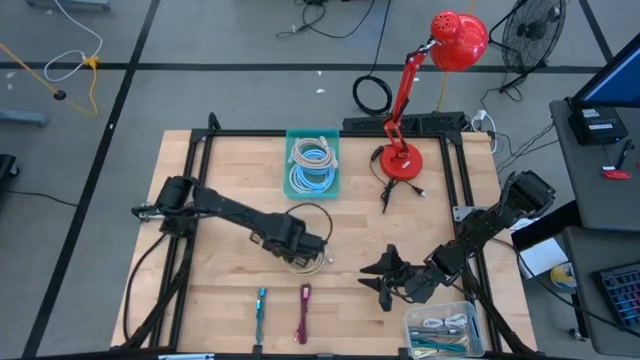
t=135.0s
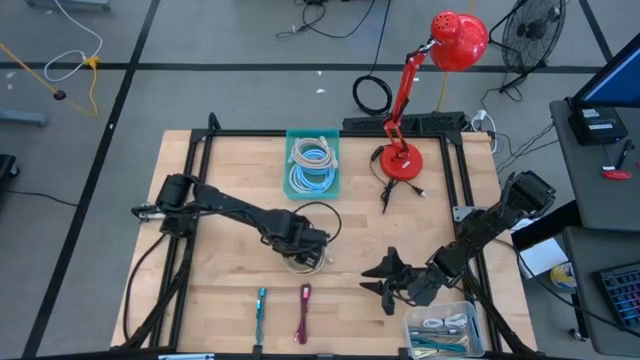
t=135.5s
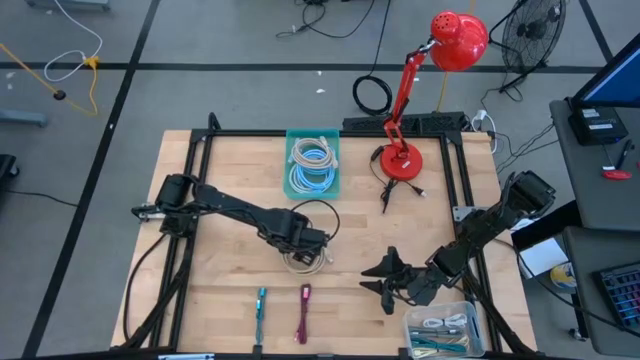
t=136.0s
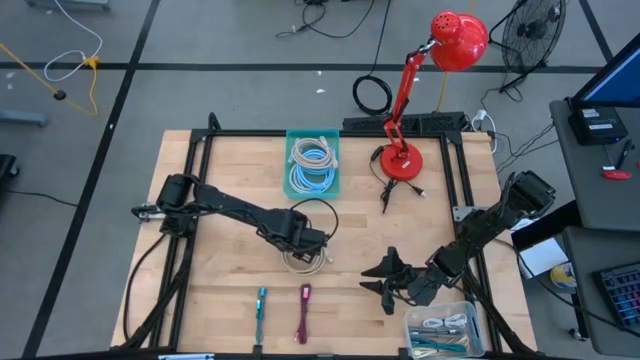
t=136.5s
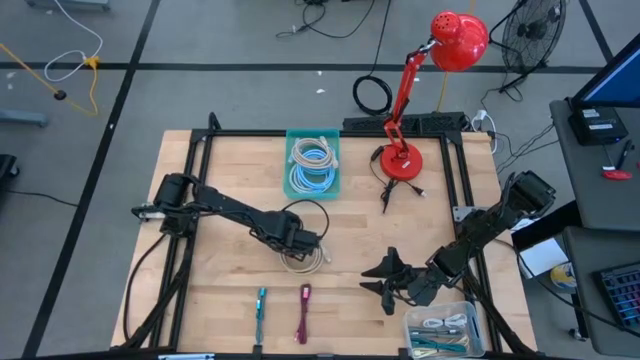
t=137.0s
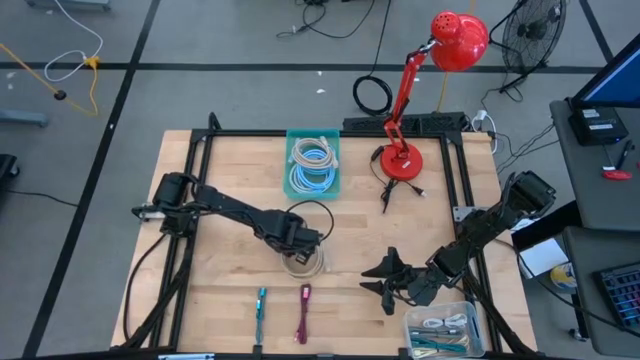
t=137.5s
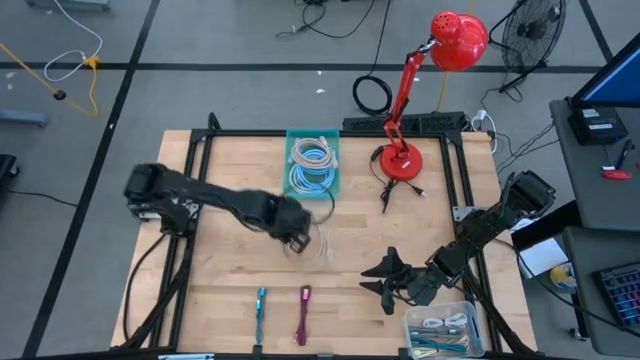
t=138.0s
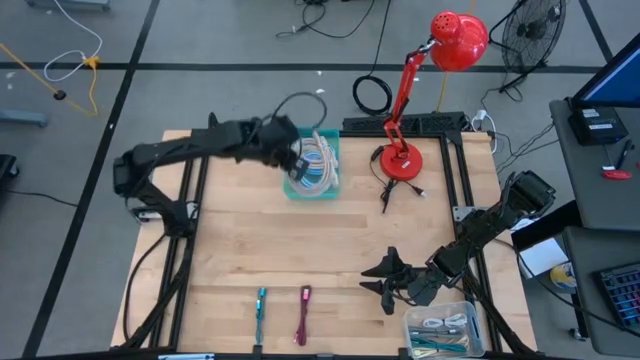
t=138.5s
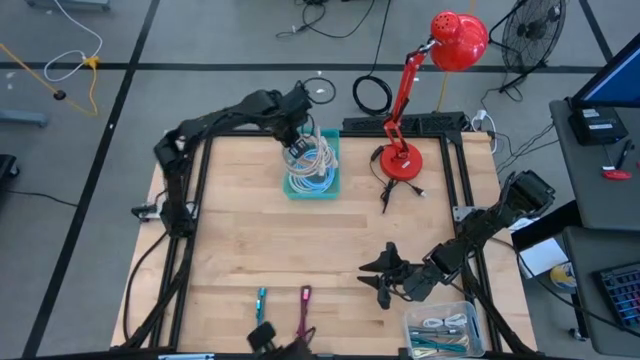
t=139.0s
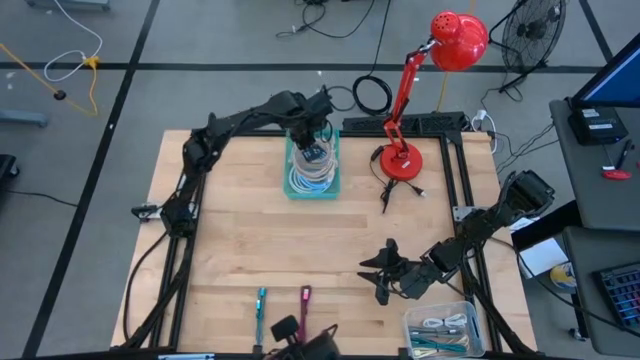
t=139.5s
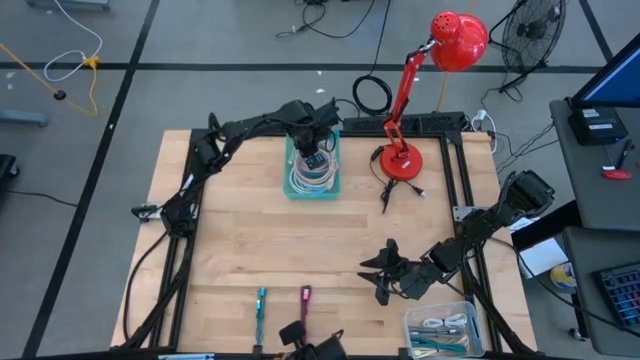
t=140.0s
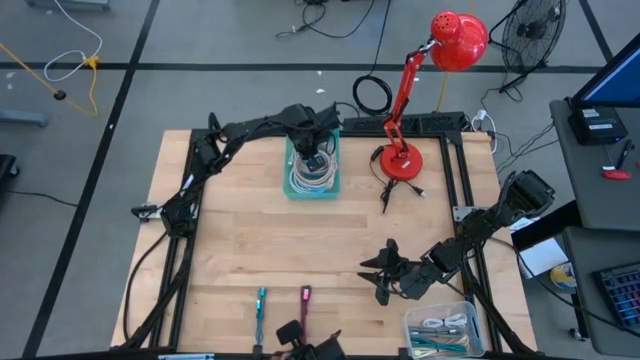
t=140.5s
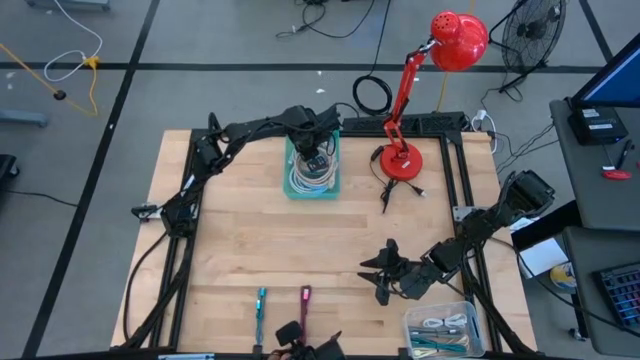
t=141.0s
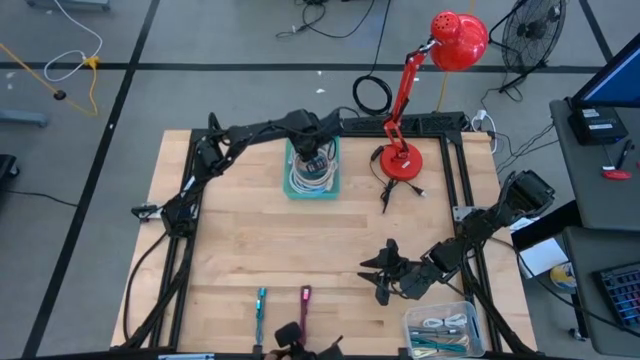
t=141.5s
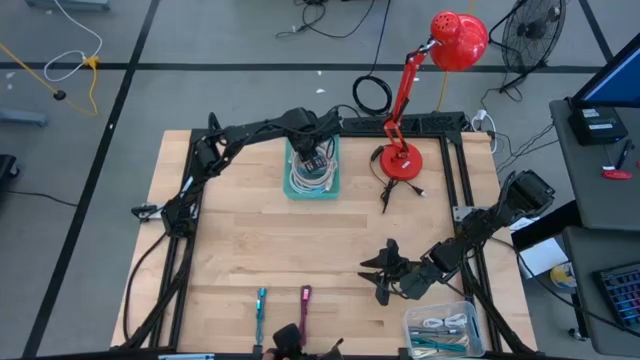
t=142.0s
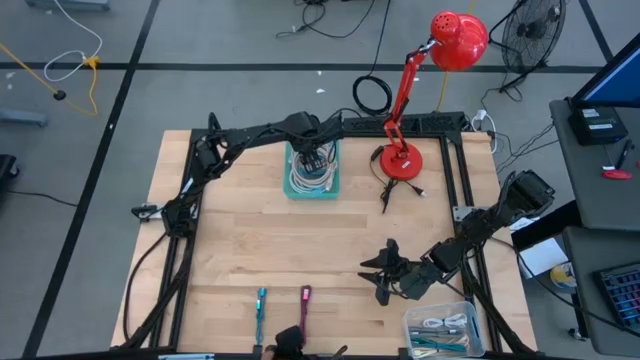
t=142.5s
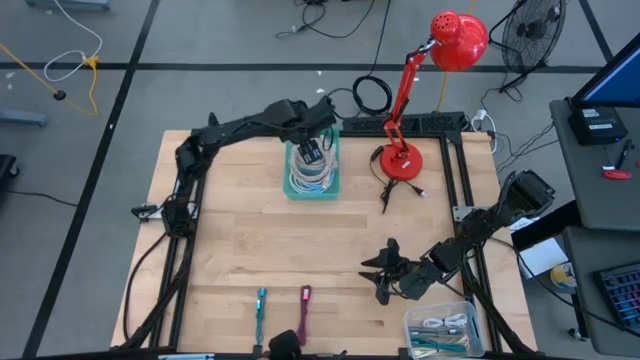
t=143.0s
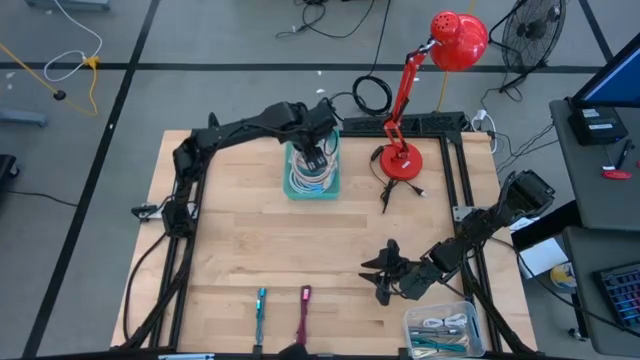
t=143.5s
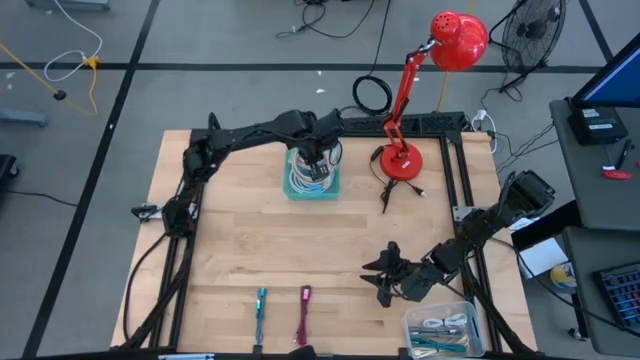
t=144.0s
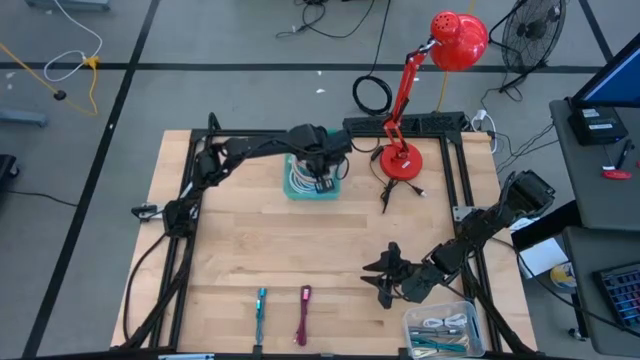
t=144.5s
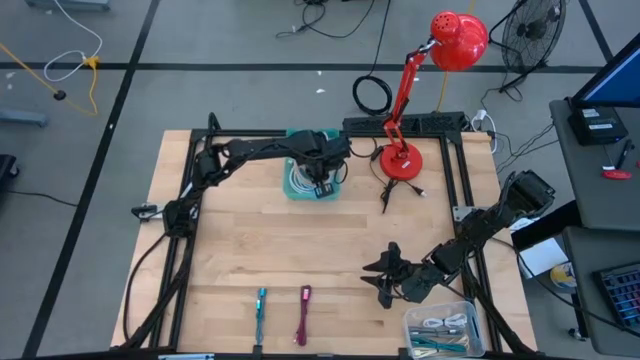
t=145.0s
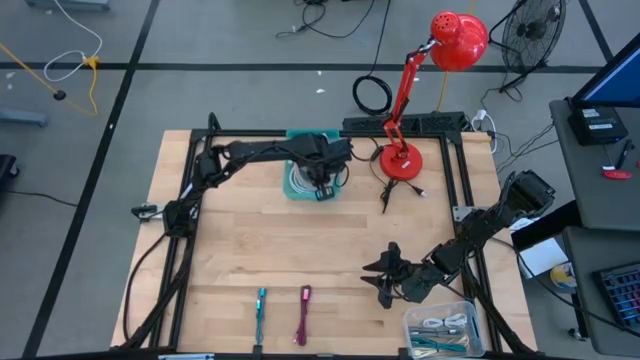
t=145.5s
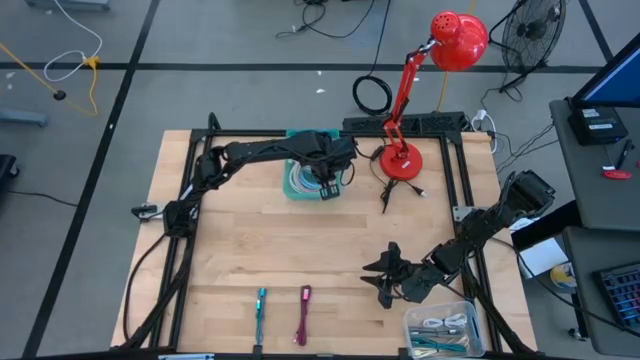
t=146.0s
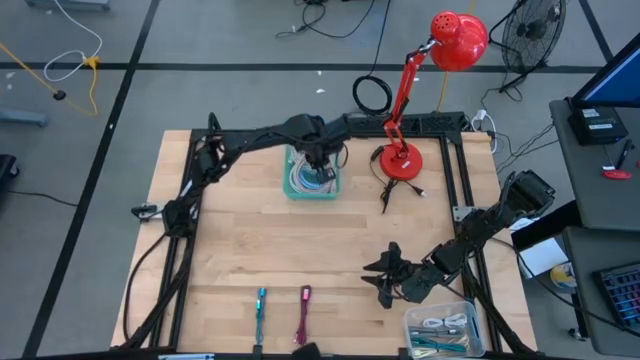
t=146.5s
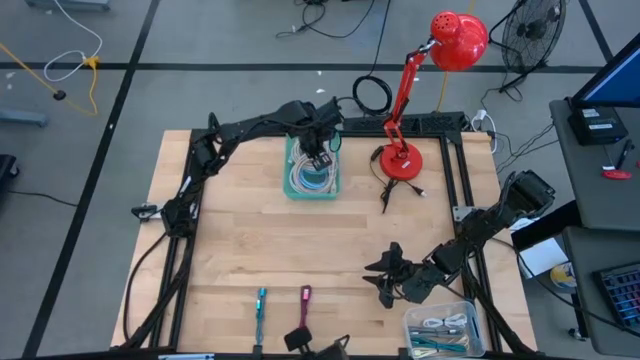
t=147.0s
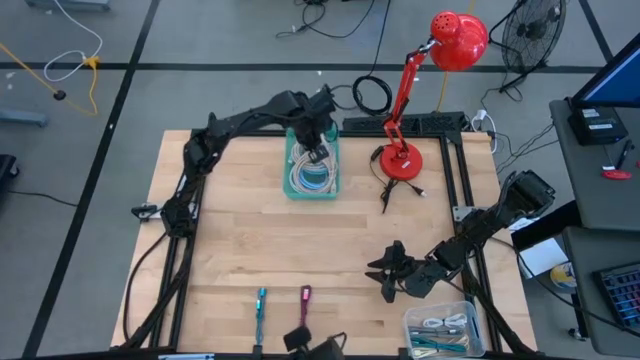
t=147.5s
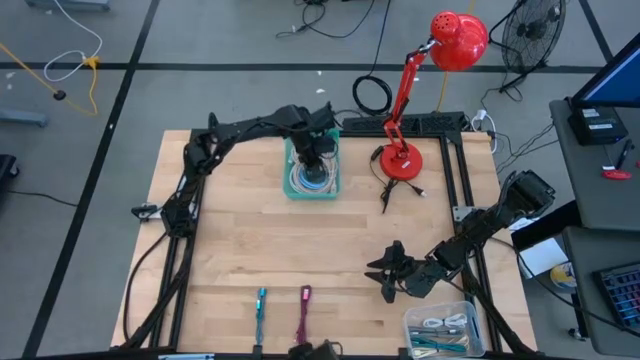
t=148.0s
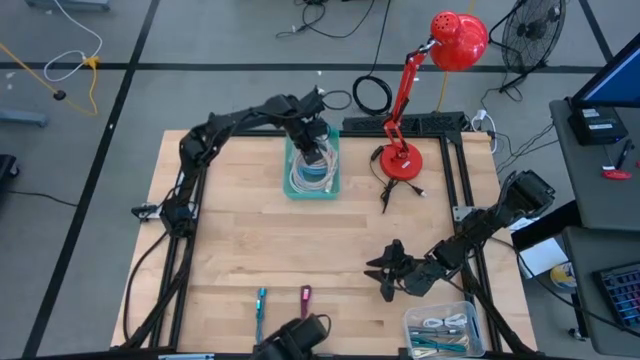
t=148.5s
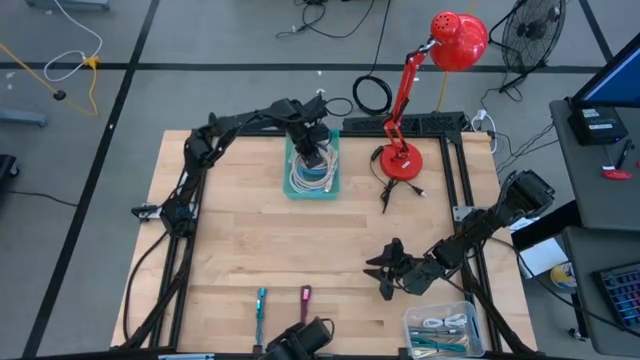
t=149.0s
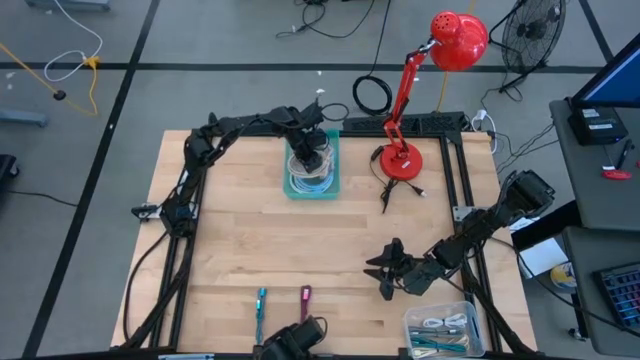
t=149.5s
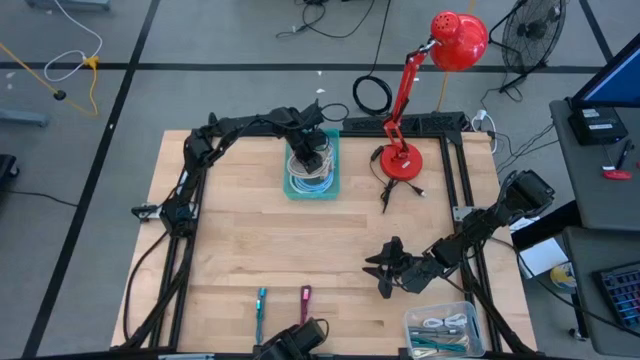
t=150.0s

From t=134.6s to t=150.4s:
Task: Pick & Place USB Port
Put the brown HDMI cable into the green bin

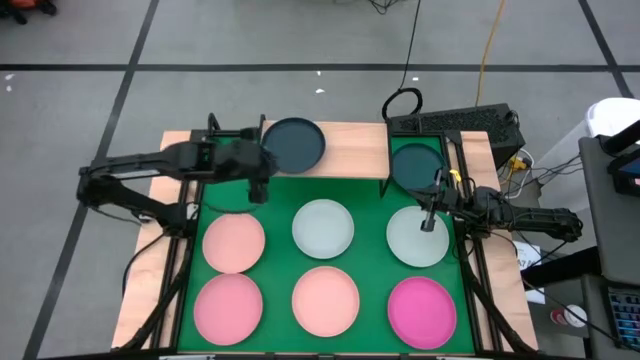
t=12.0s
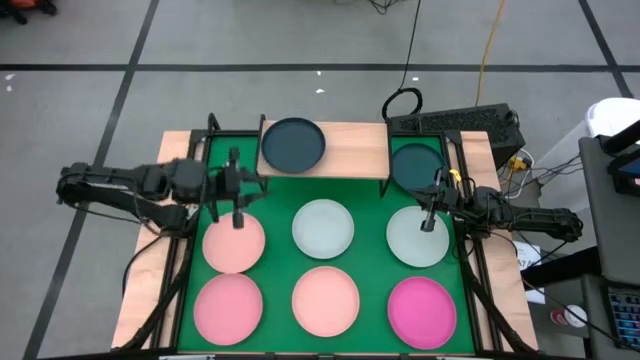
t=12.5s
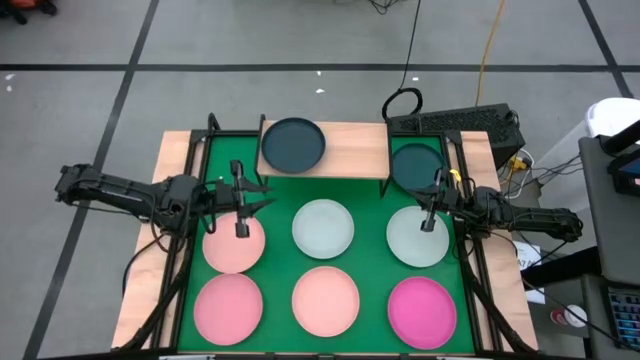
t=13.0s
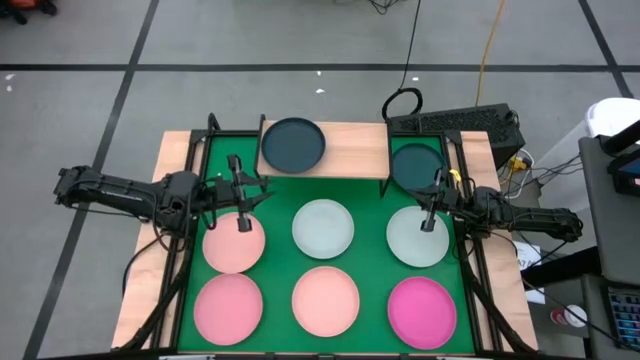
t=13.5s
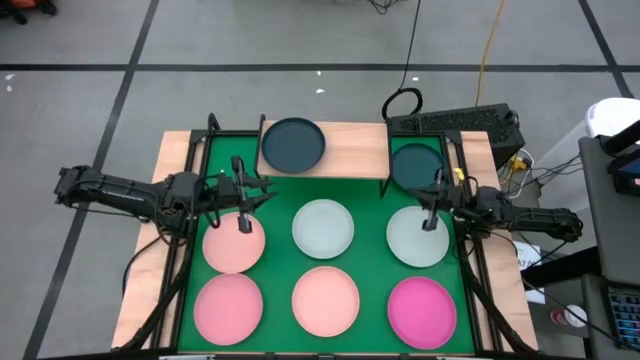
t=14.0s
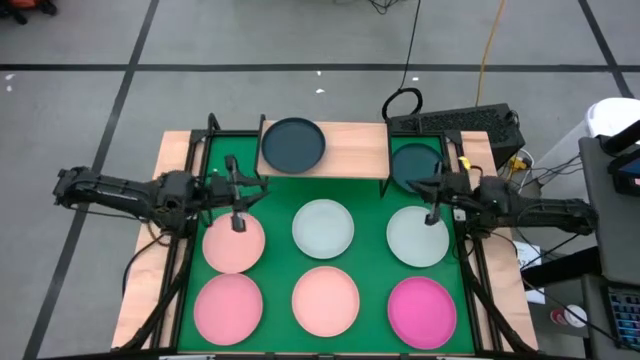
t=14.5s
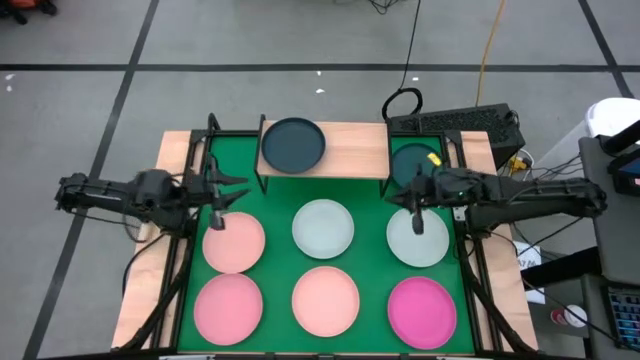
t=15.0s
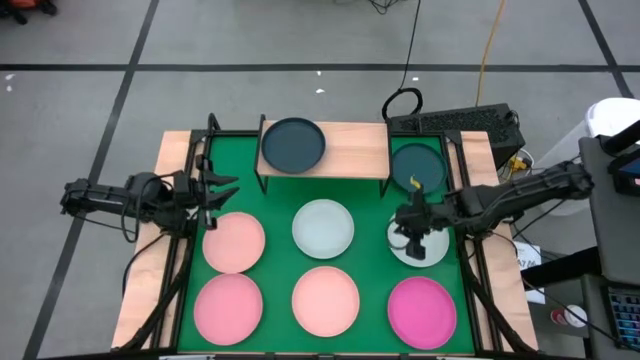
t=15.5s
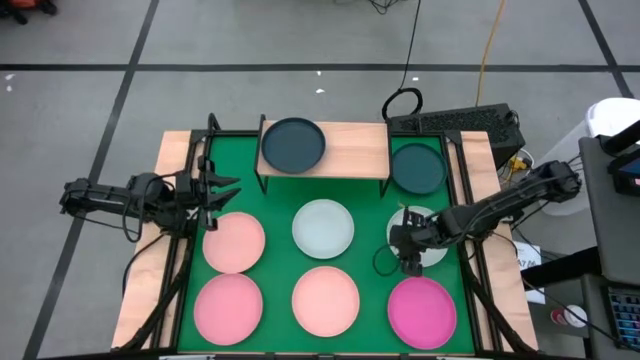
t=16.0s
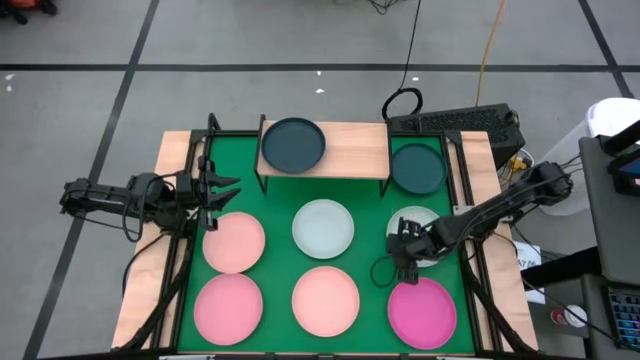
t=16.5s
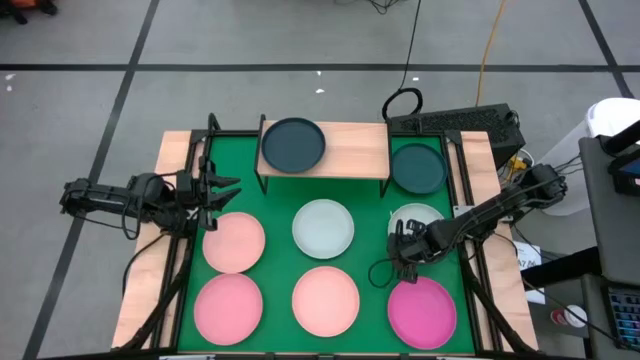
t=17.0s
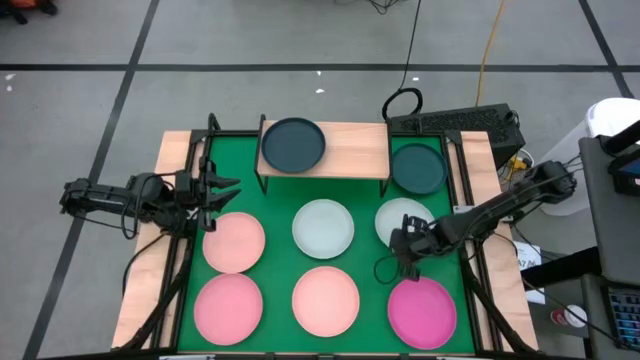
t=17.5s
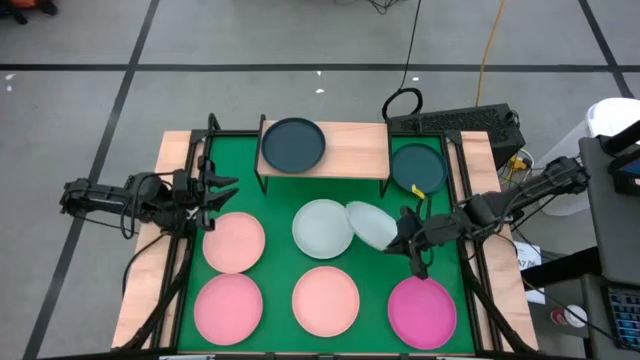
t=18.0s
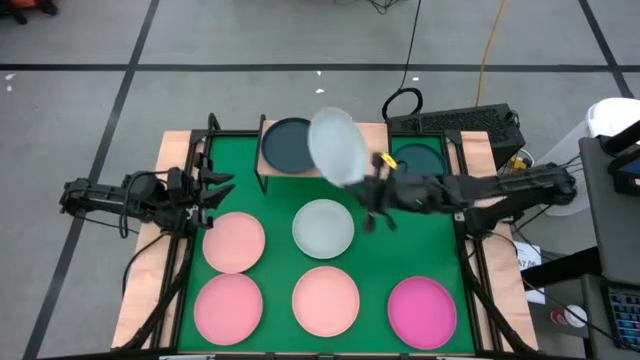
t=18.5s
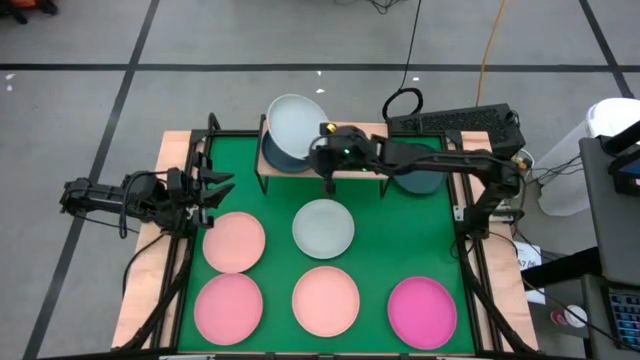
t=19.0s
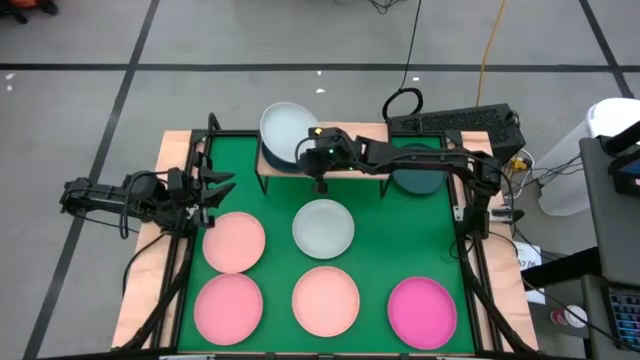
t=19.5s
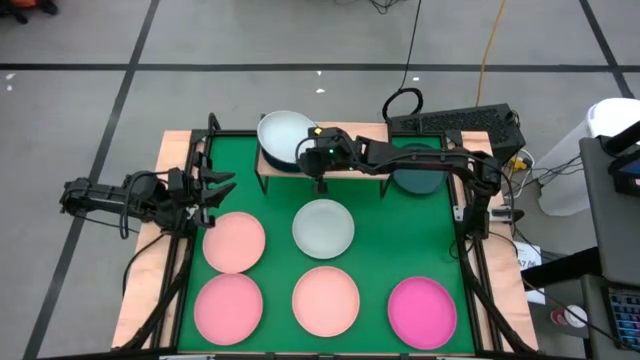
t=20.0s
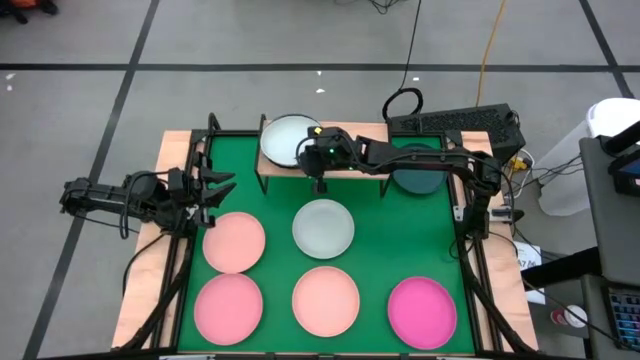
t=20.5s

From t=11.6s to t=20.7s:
Task: Place and stack plates onto a shelf
Stack the right white plate on top of the black plate on the shelf
